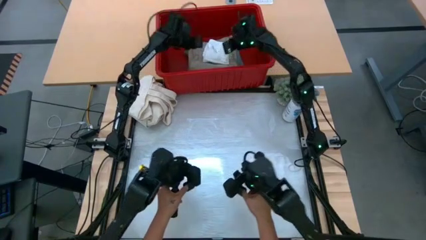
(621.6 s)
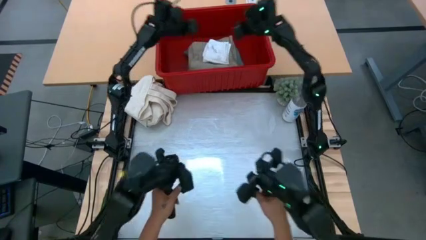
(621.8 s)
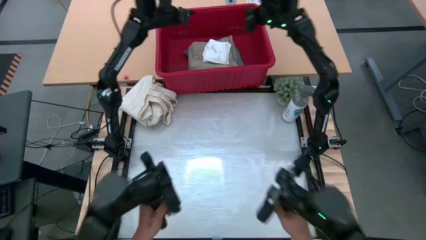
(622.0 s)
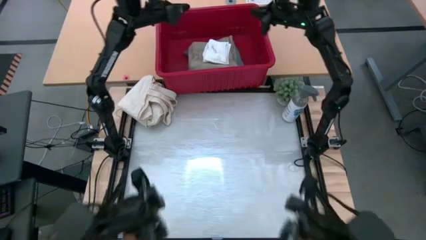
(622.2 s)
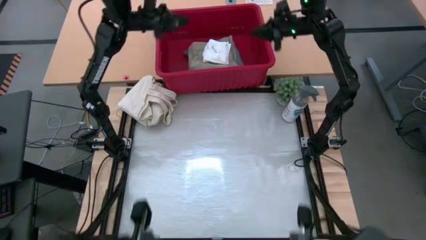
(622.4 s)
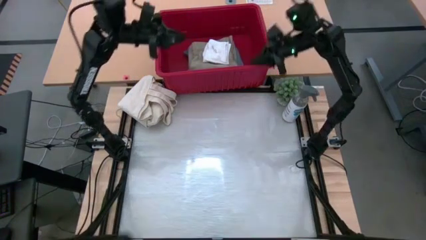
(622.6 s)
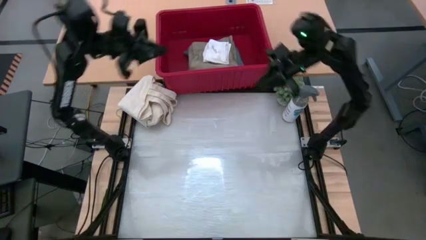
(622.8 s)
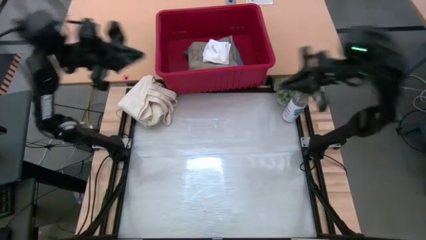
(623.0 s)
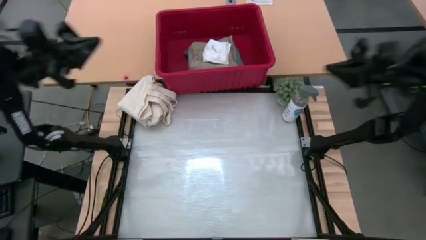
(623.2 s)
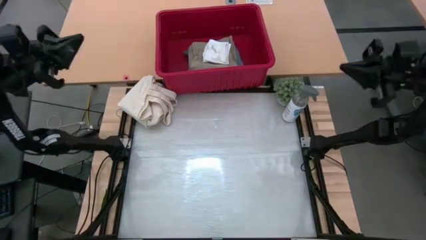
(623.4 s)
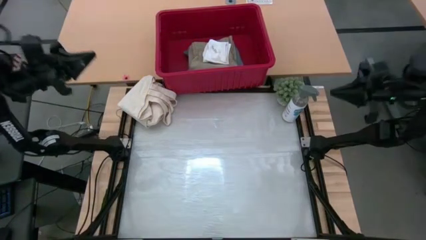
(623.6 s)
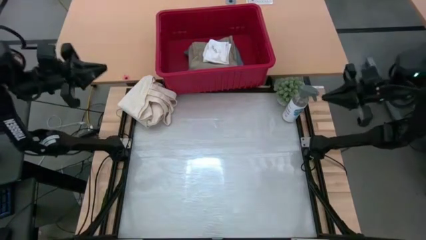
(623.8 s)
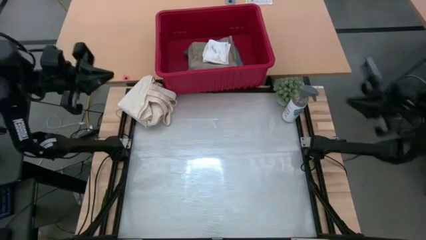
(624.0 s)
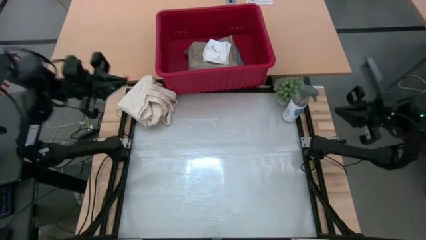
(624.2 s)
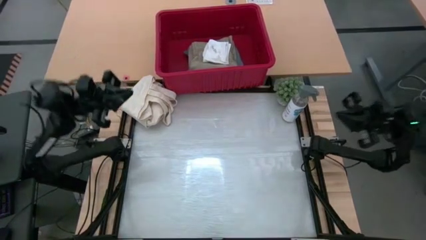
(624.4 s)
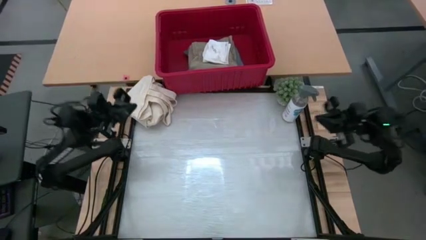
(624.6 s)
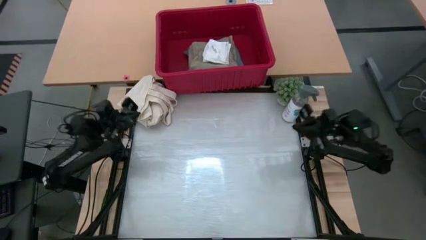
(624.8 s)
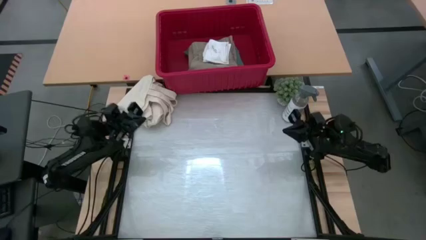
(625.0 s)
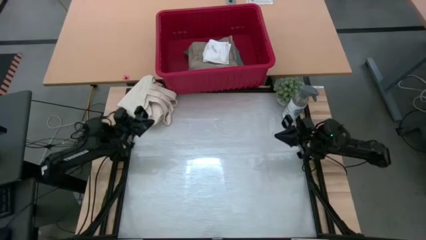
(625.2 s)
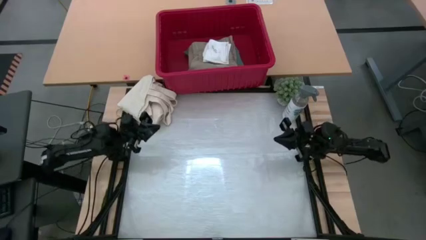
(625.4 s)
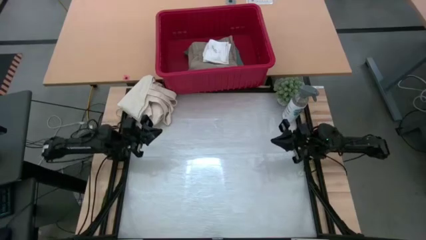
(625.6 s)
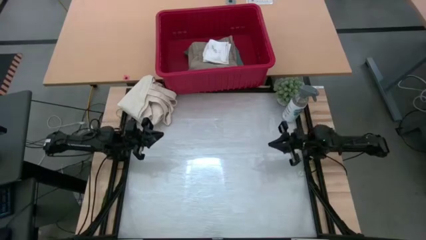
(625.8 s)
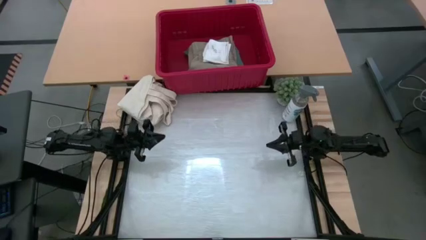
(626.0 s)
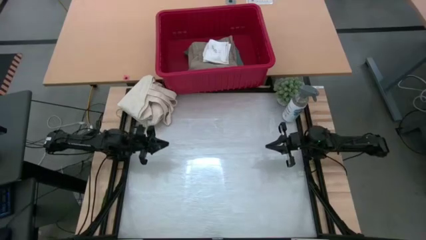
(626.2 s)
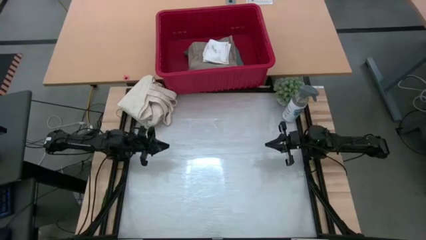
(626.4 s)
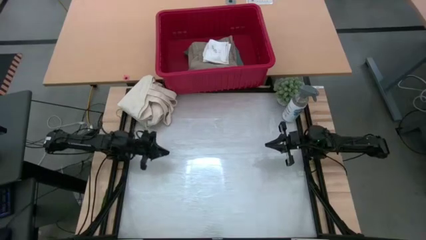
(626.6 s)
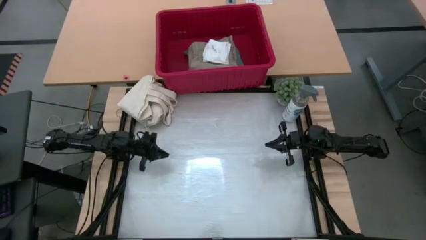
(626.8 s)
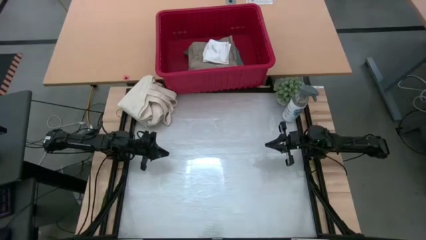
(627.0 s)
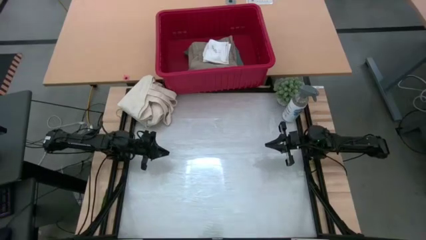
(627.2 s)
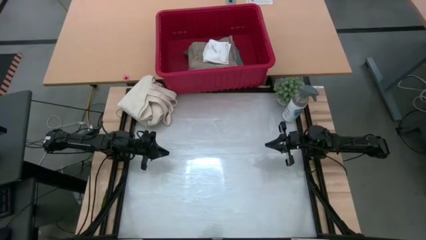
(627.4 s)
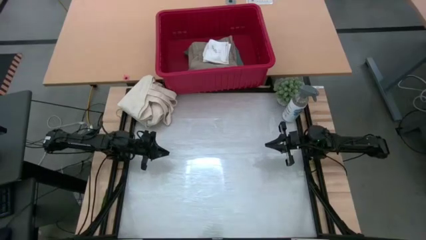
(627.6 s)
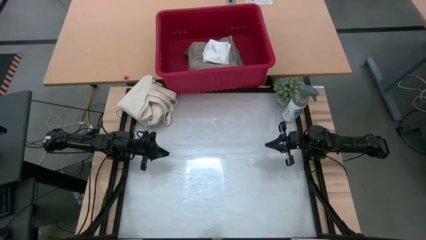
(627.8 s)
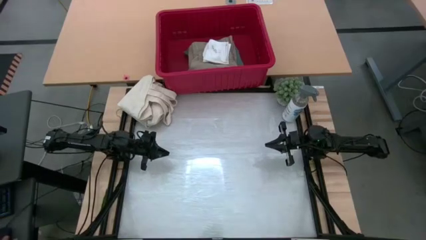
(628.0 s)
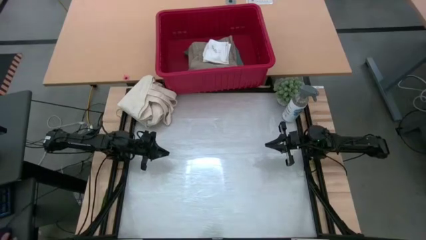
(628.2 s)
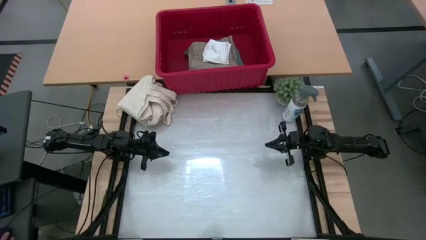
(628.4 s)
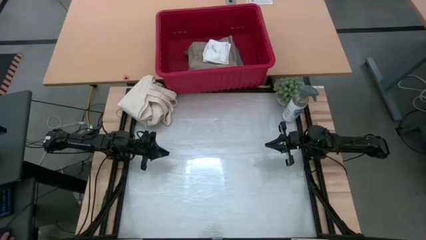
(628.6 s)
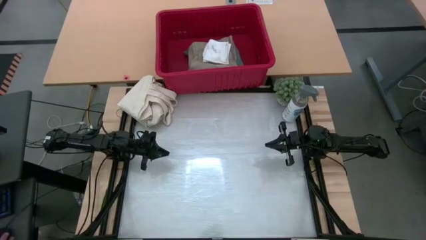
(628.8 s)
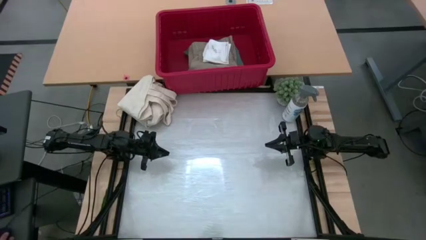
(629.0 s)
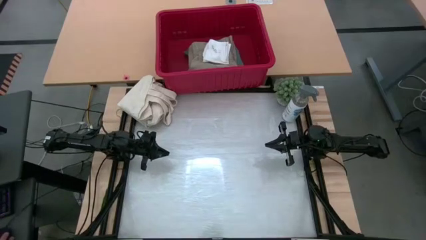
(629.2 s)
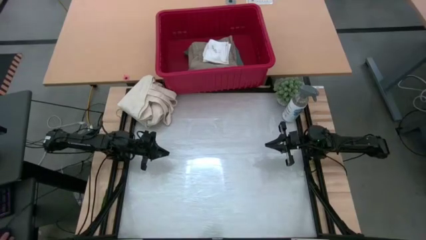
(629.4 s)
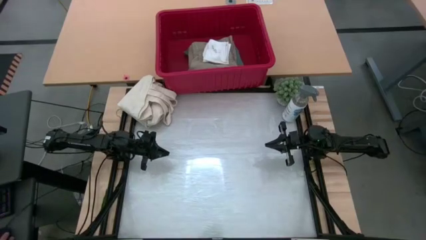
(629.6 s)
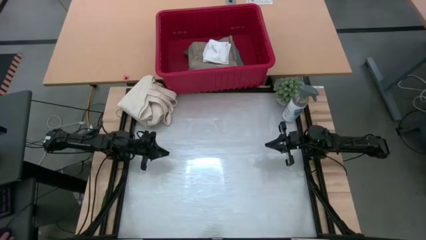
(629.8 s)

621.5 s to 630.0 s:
Task: Fold Laundry from Bin
Return to Home Position

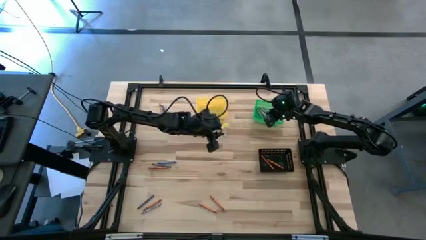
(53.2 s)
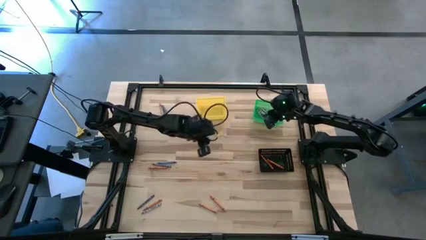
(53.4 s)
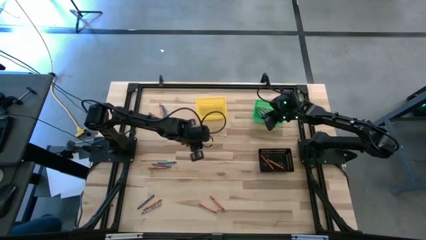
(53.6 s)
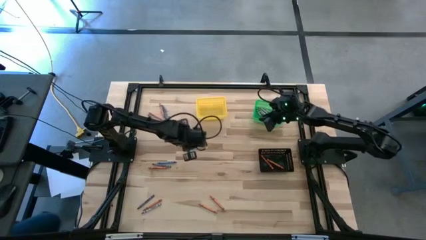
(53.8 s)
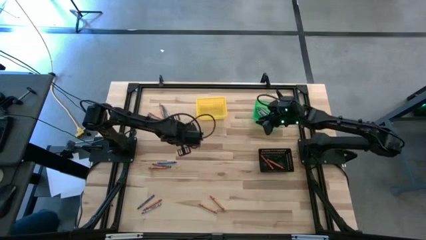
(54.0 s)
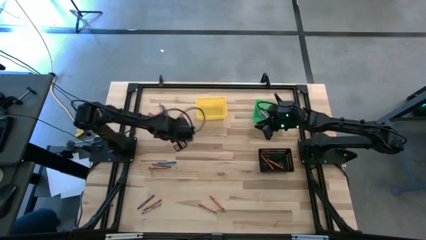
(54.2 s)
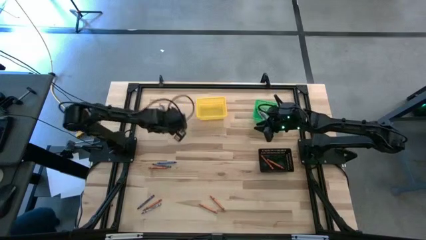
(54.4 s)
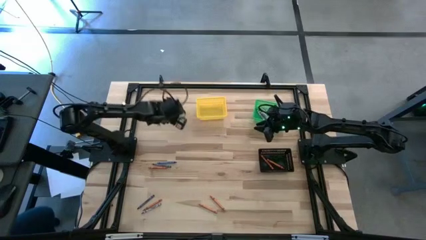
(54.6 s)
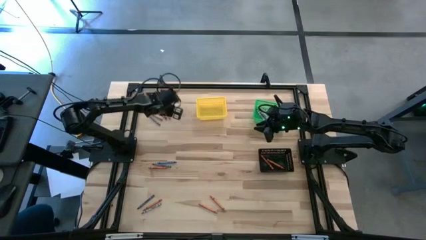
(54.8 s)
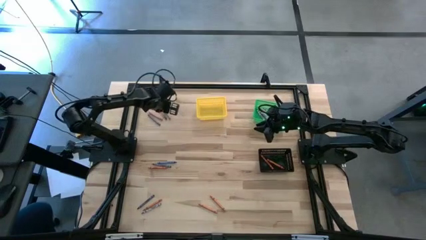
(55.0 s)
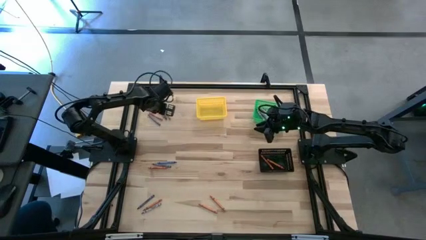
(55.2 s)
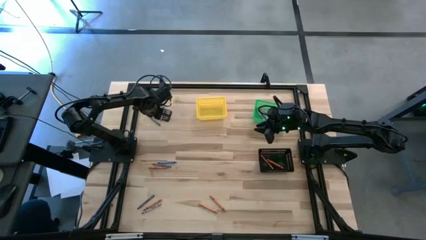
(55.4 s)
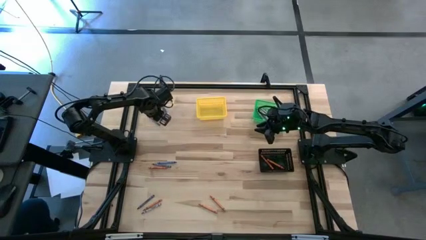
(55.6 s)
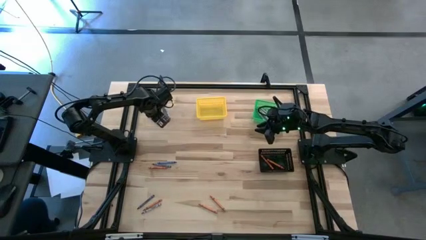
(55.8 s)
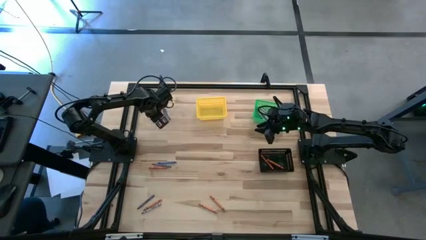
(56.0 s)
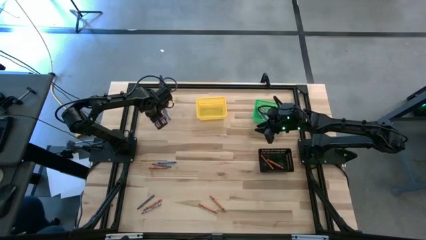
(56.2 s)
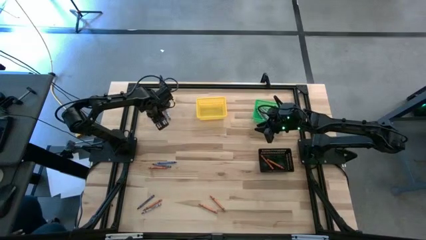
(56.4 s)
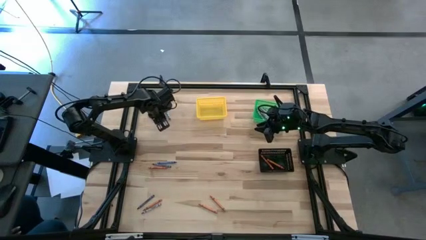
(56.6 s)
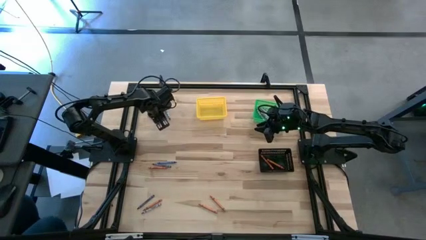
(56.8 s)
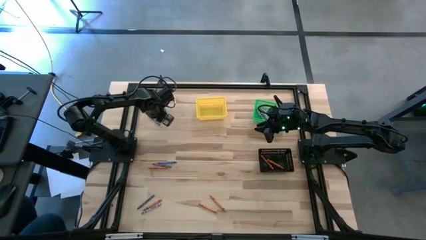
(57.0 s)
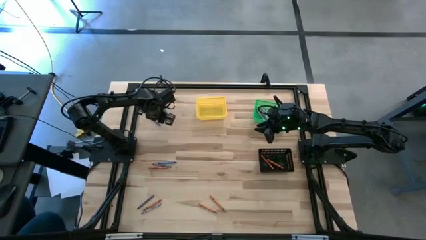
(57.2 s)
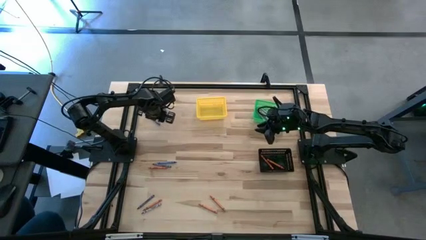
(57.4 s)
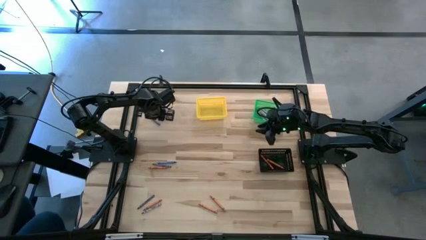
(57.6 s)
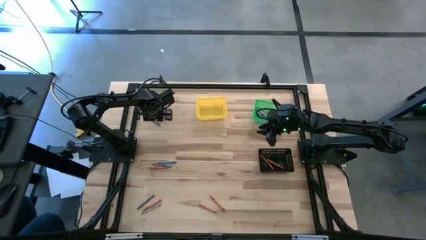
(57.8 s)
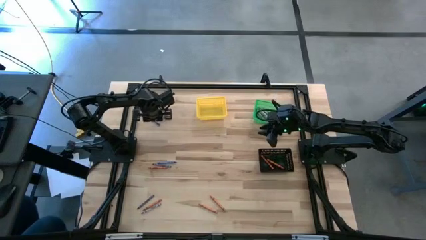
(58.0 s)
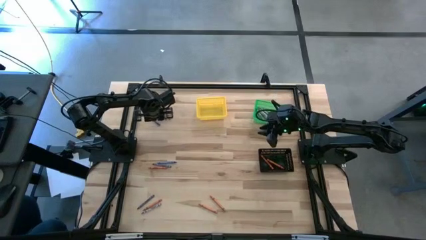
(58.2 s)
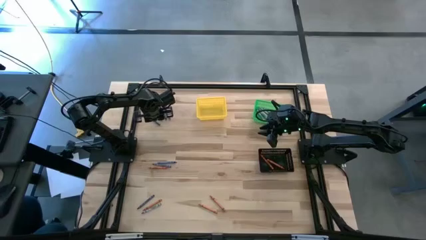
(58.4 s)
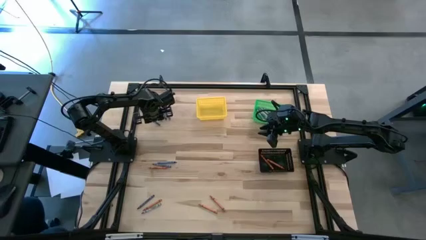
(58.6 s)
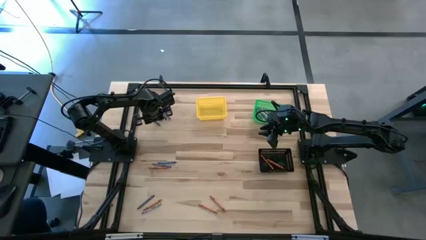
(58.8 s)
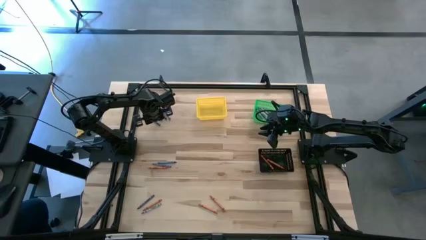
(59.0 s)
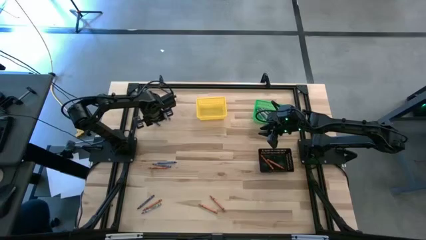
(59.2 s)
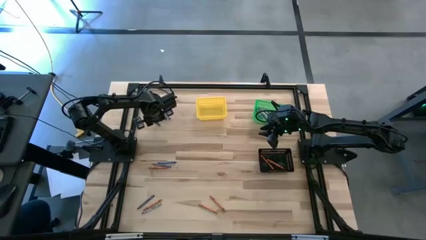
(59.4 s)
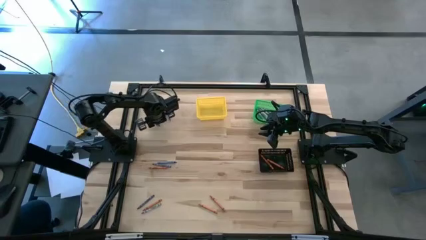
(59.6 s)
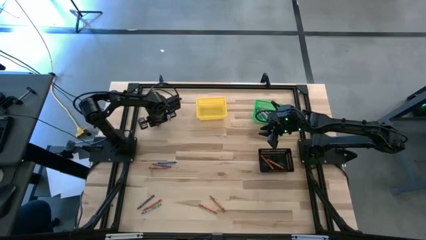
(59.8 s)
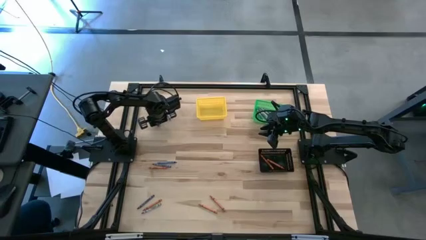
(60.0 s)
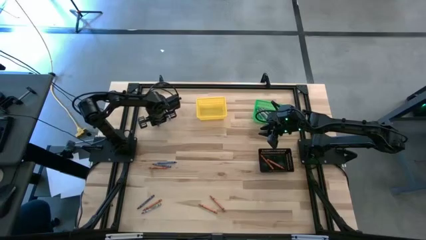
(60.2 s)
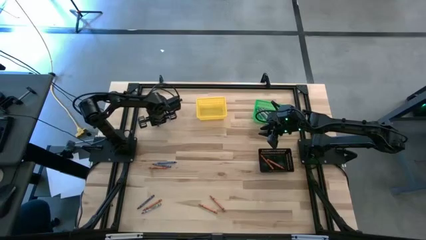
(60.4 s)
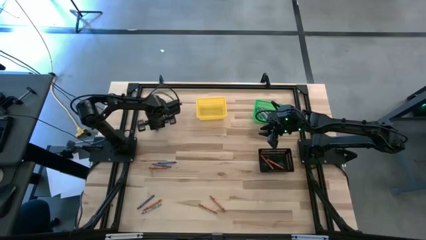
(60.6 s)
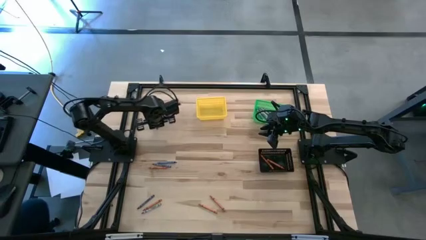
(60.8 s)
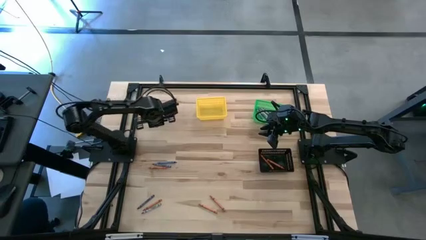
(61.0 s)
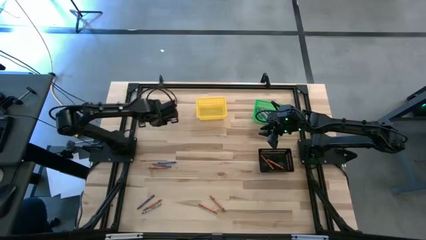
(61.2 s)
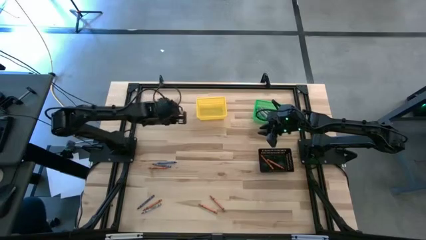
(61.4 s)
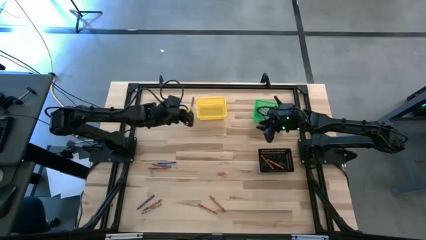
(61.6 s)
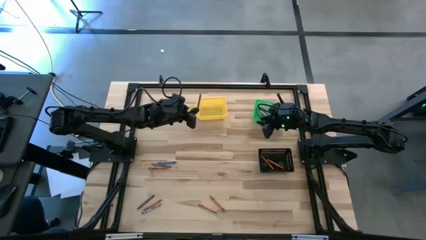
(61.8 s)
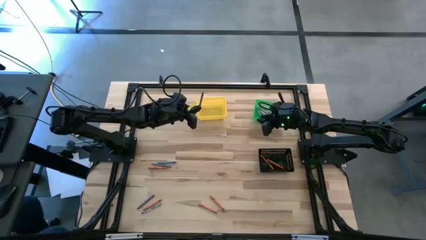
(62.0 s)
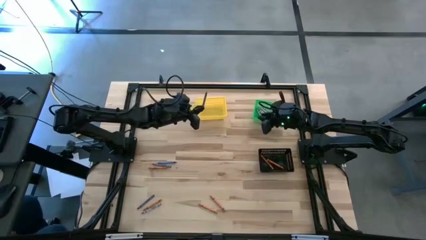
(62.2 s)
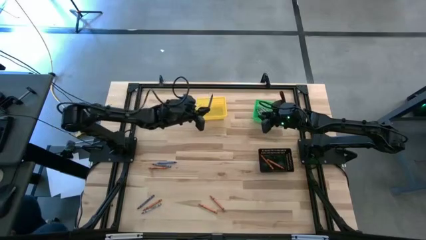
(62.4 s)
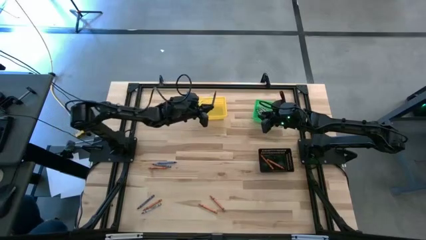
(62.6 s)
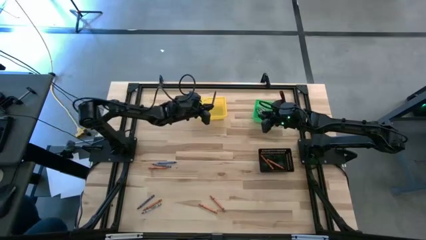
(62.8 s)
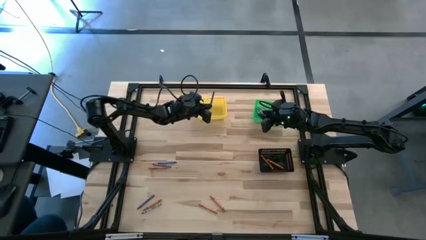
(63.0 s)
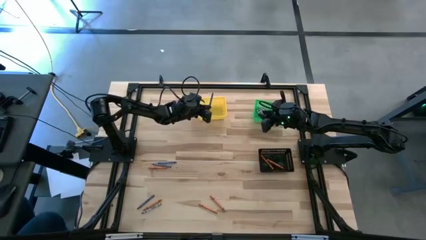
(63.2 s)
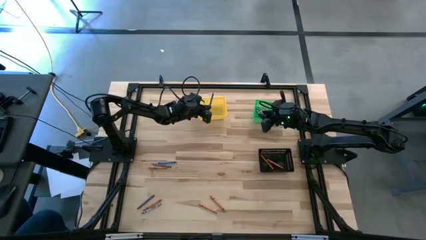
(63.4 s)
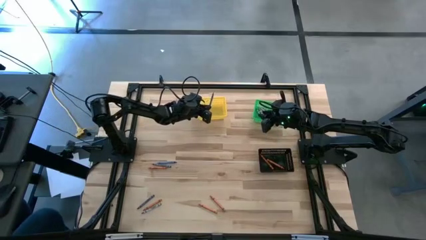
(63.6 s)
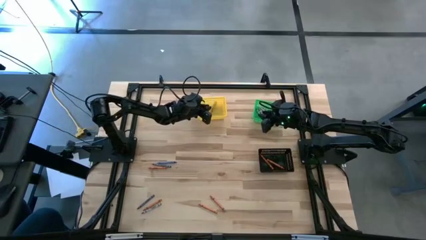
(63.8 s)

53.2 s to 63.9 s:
Task: Sort crayons
Put the blue crayon into the yellow basket
